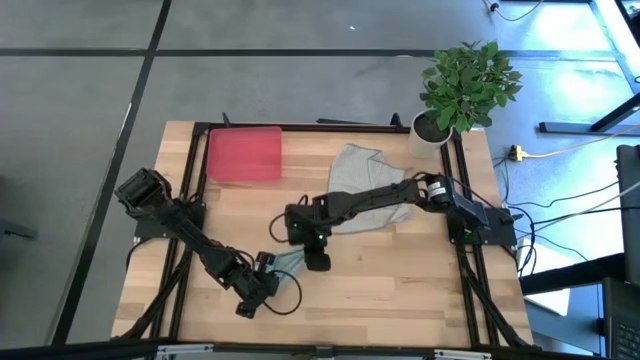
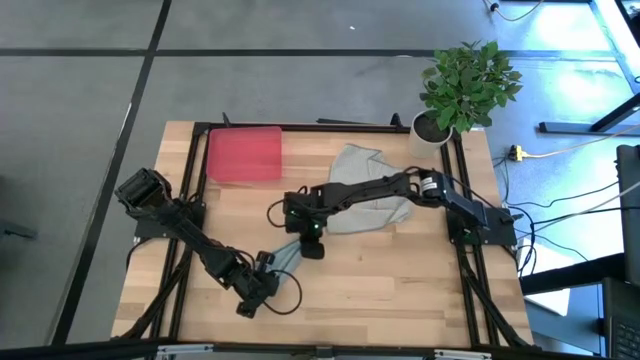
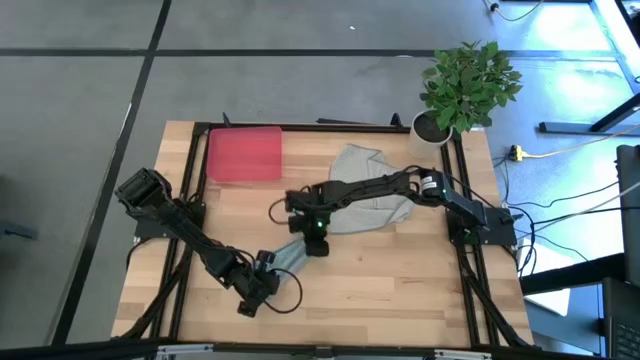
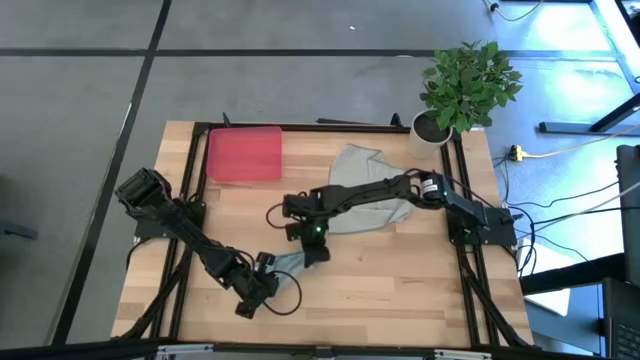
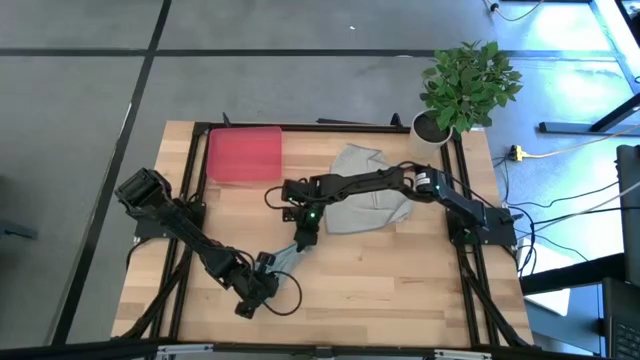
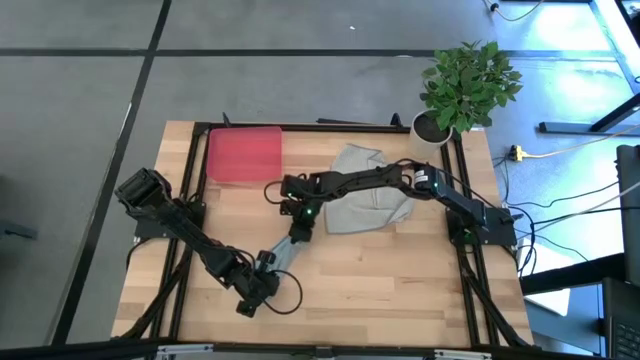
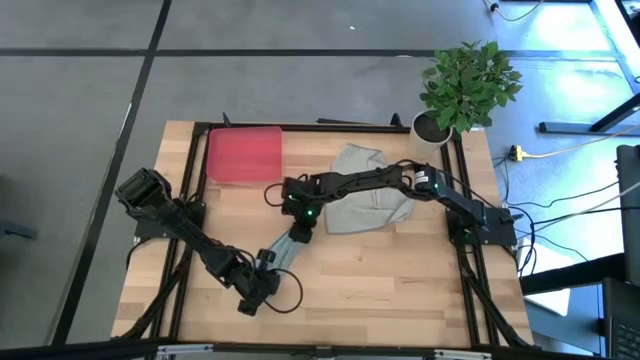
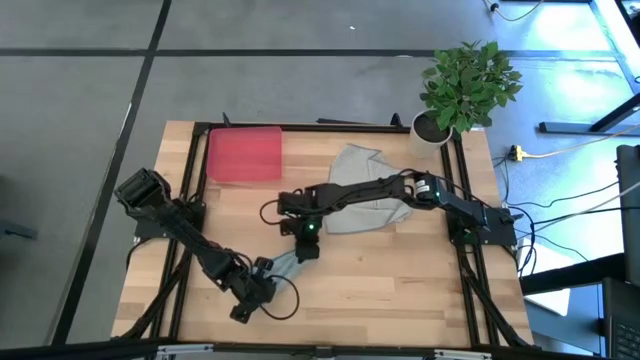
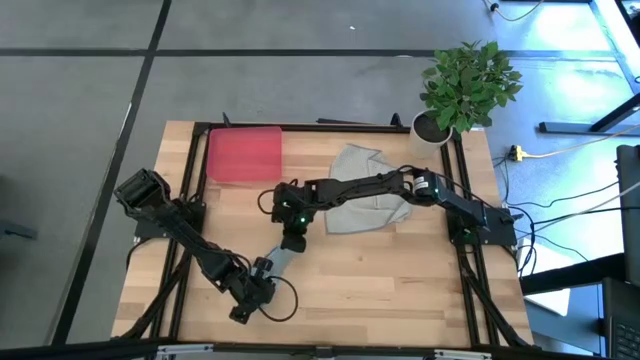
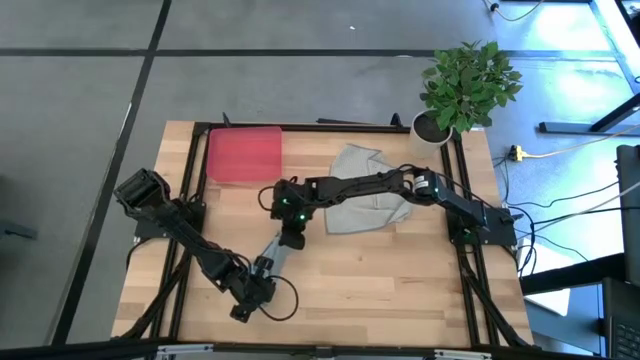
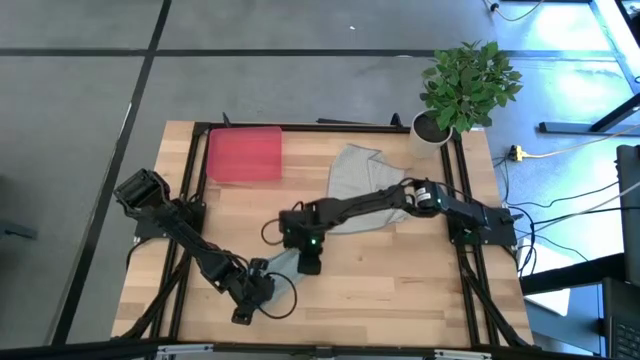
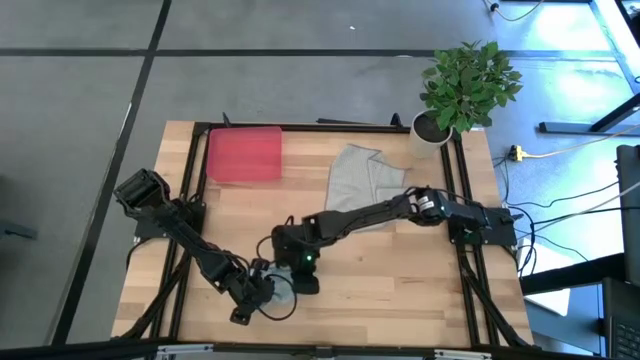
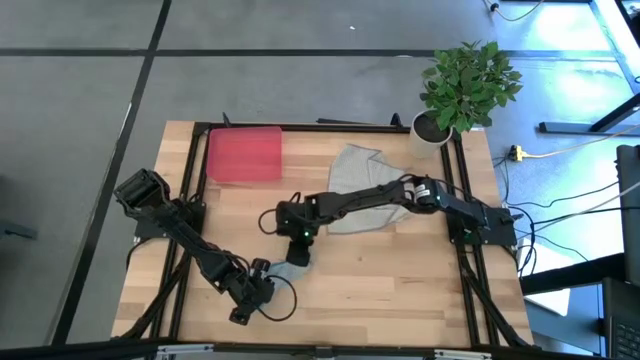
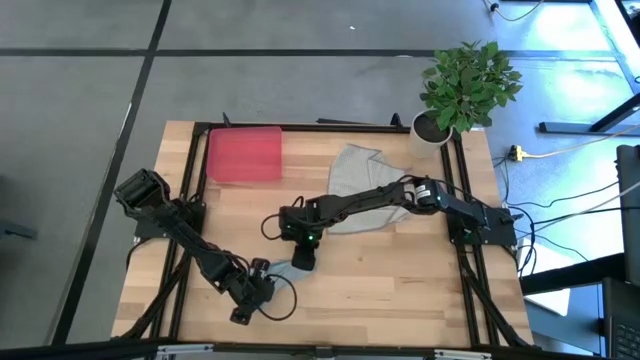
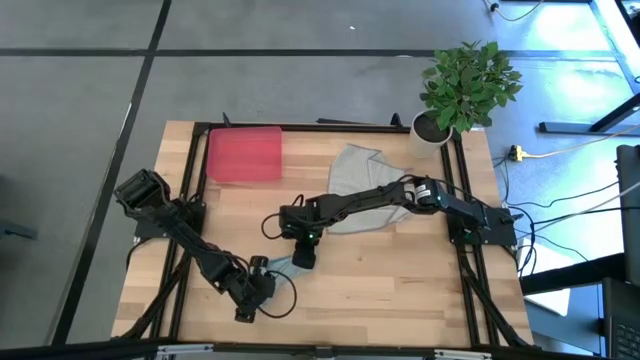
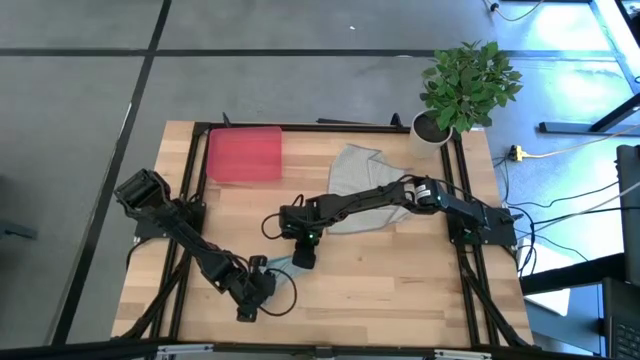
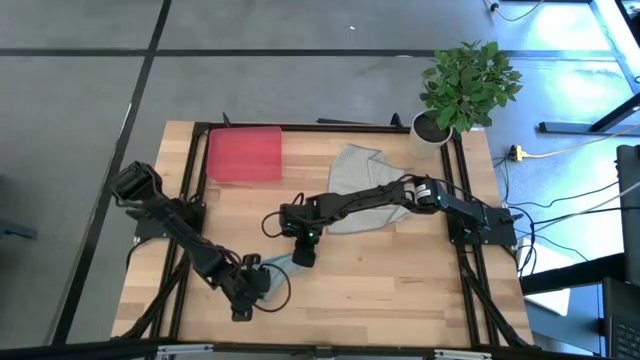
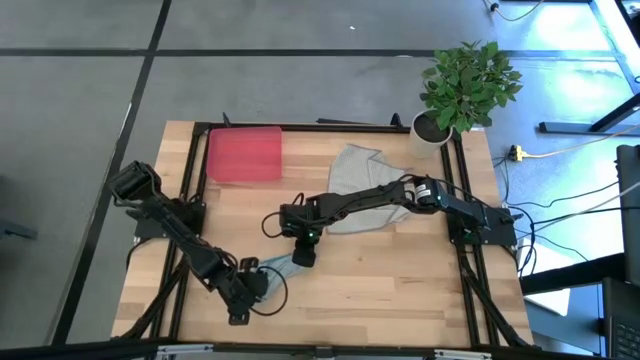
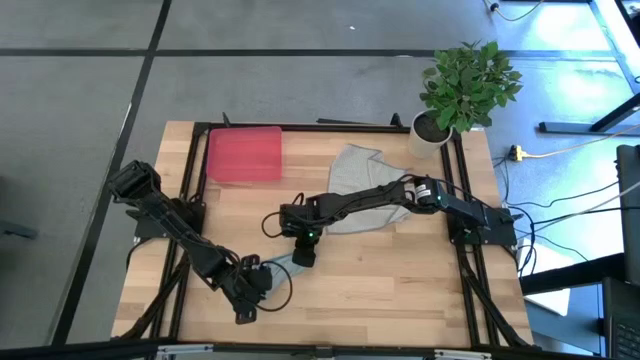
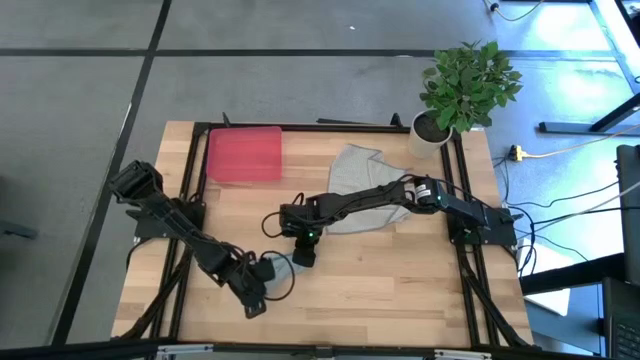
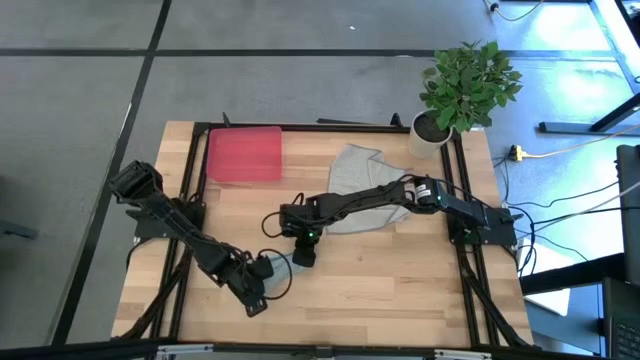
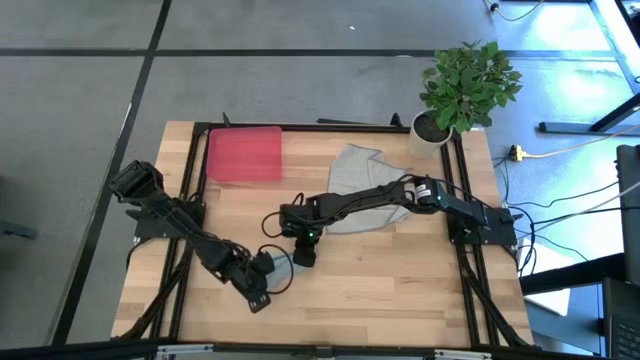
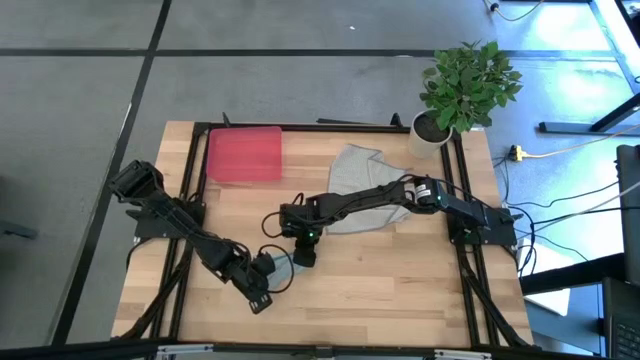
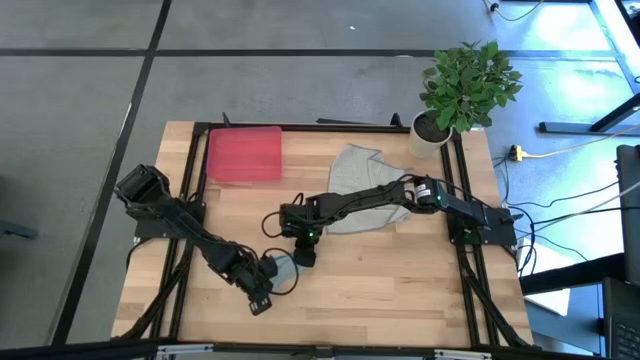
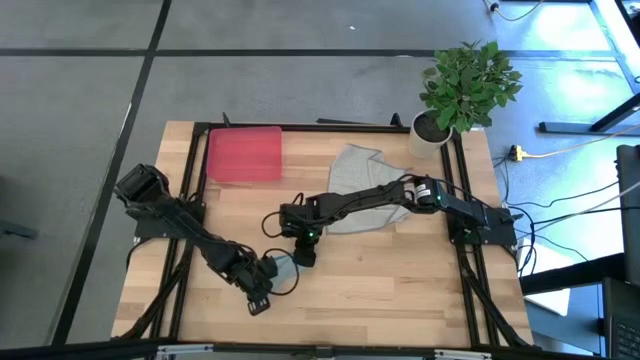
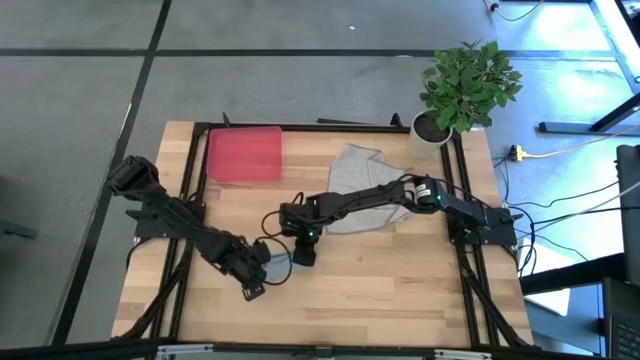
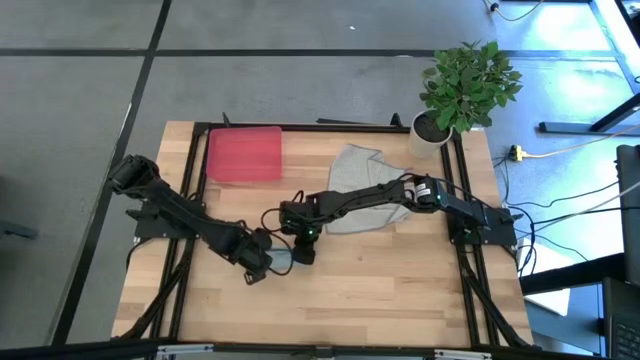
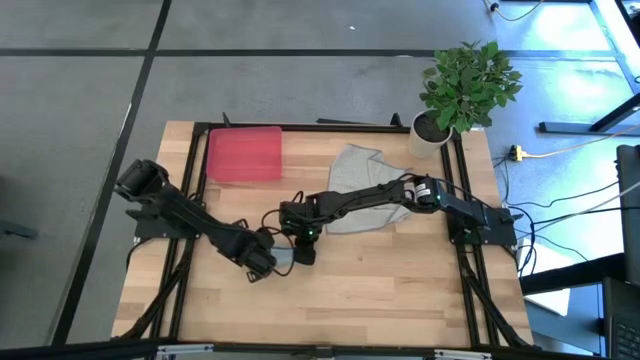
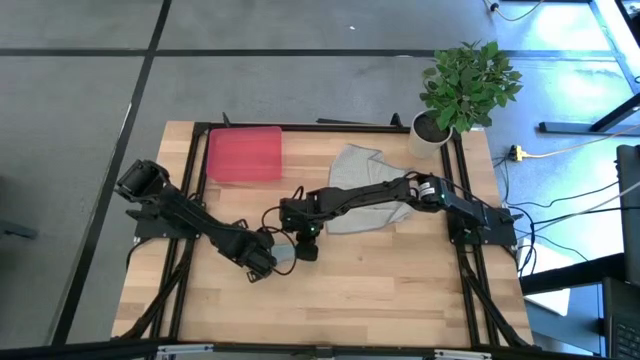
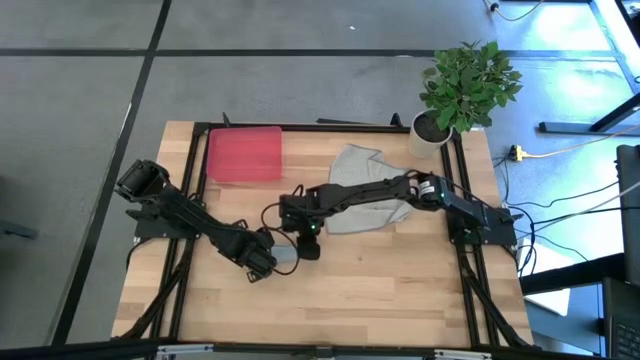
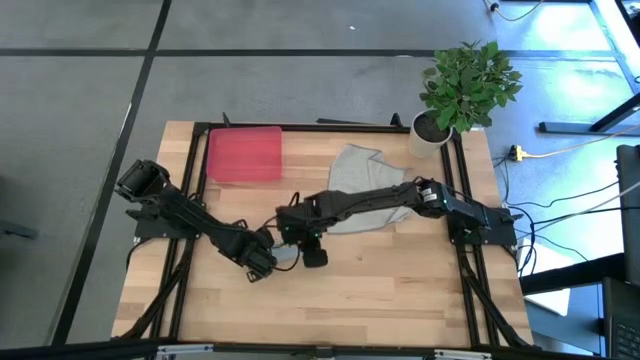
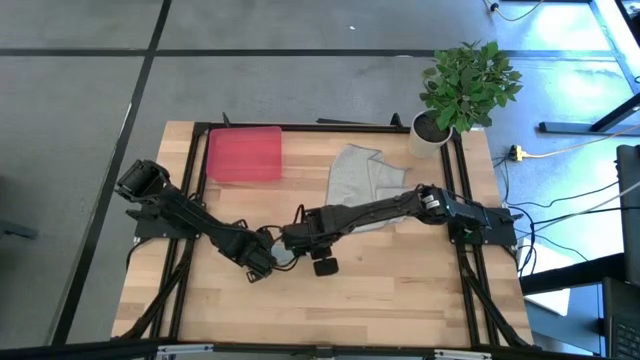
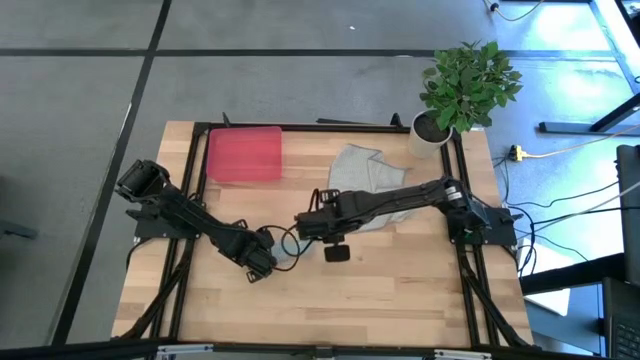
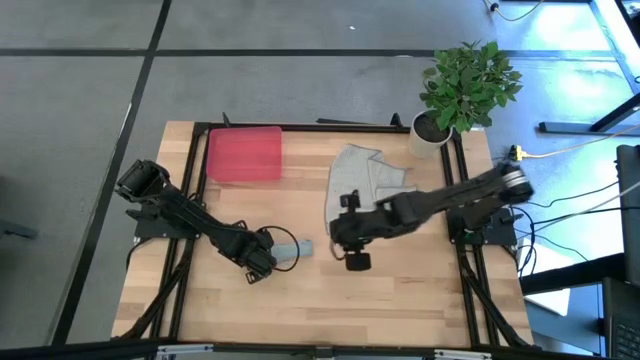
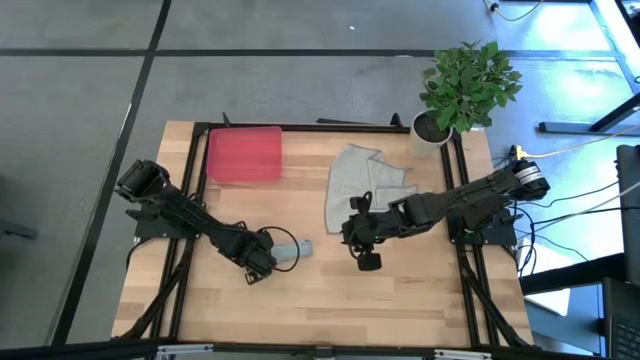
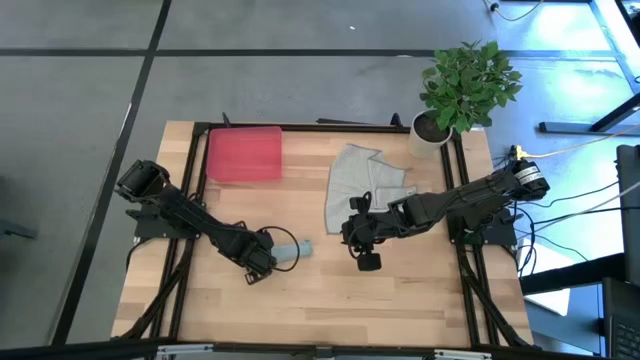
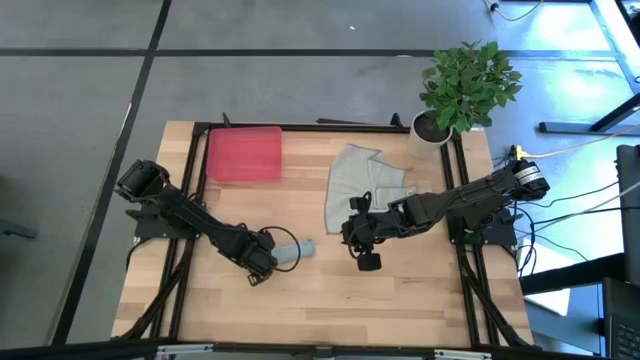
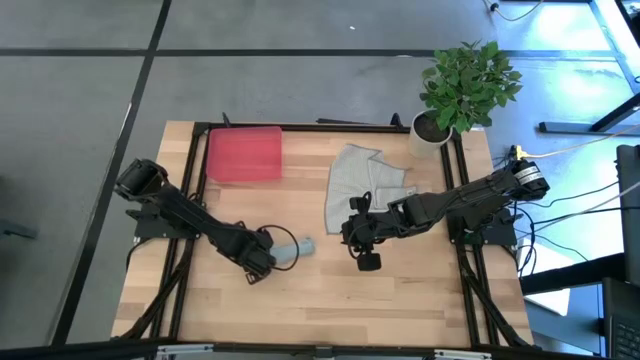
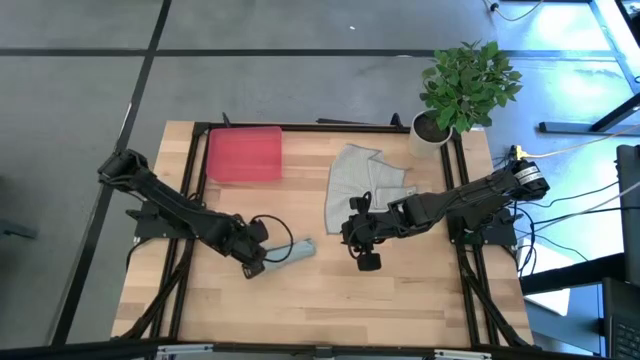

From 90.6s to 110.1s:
Task: Roll microfiber towels into tight, uniform cylinder then place into a basket
Roll the blue towel
